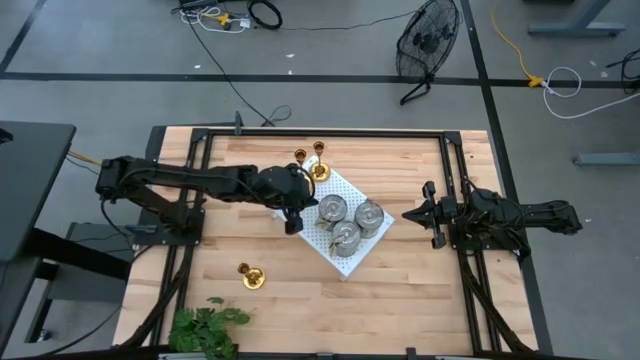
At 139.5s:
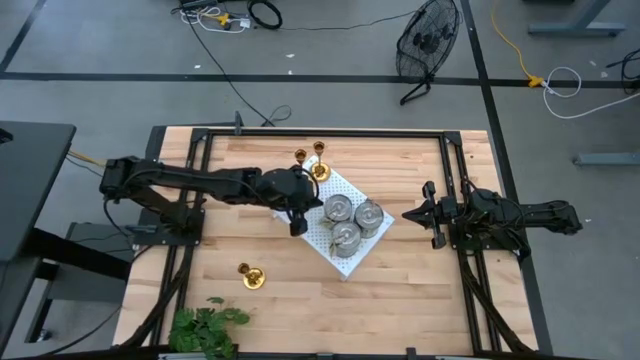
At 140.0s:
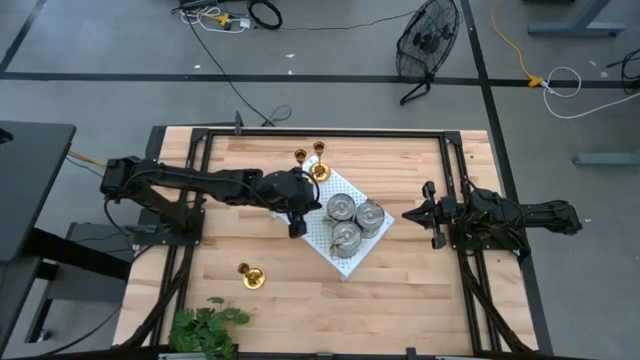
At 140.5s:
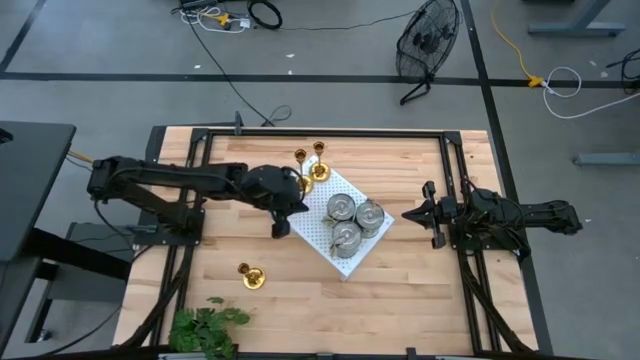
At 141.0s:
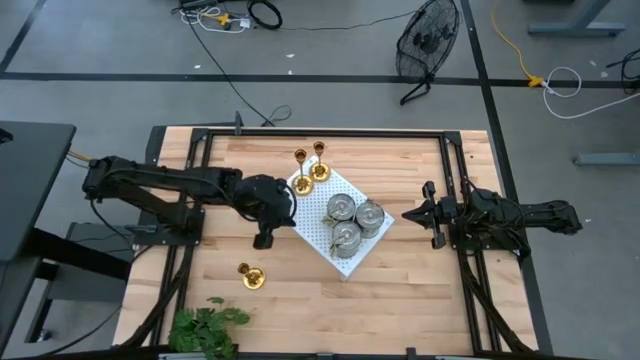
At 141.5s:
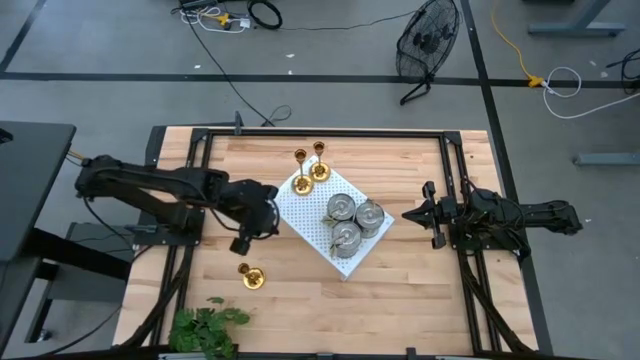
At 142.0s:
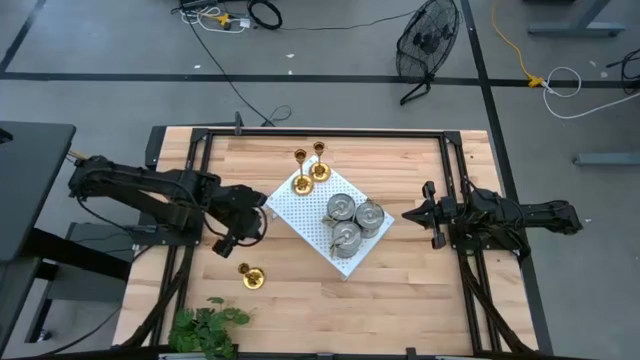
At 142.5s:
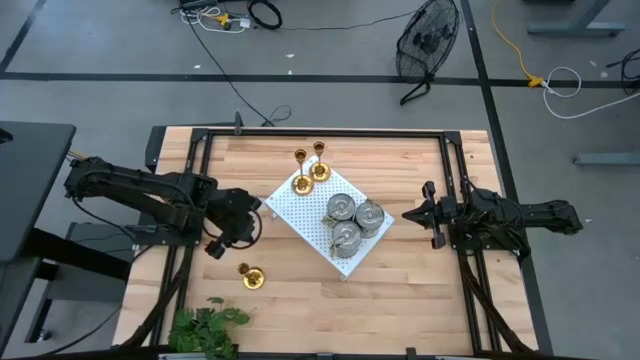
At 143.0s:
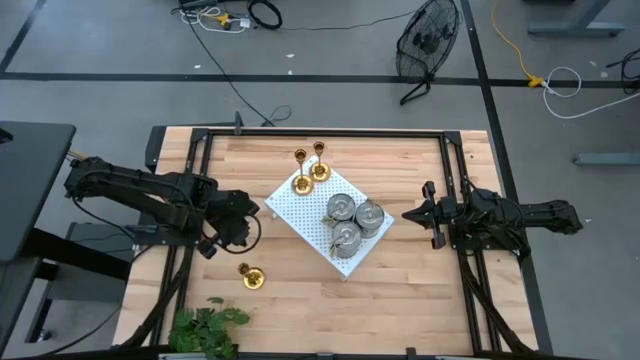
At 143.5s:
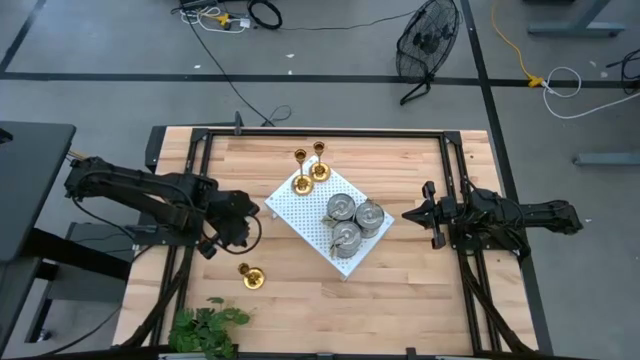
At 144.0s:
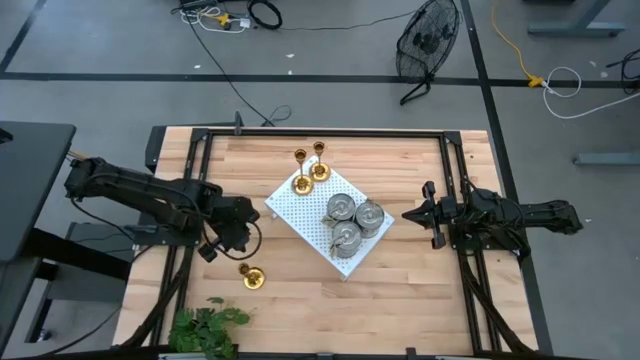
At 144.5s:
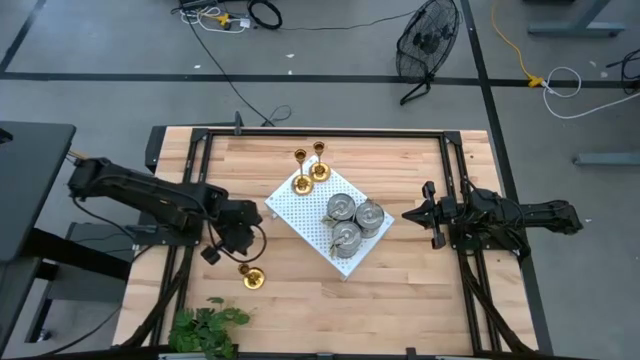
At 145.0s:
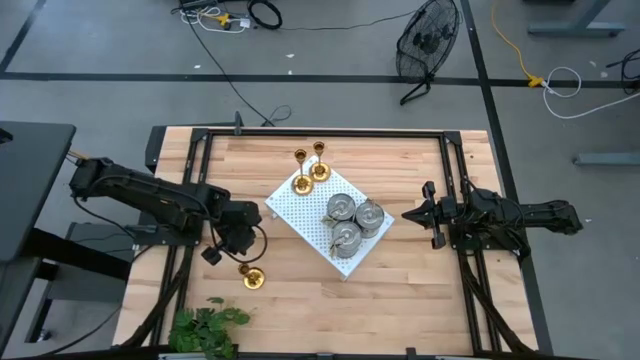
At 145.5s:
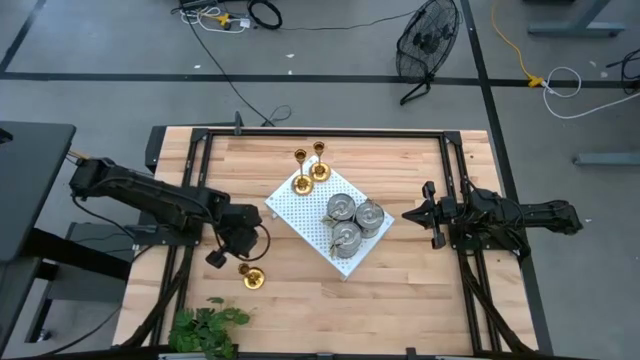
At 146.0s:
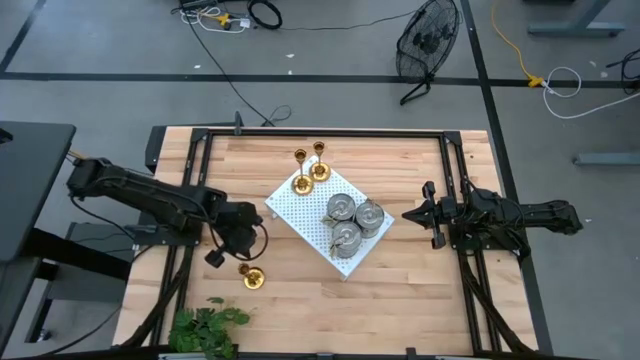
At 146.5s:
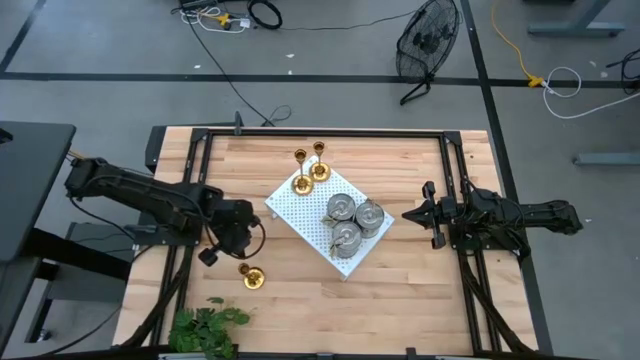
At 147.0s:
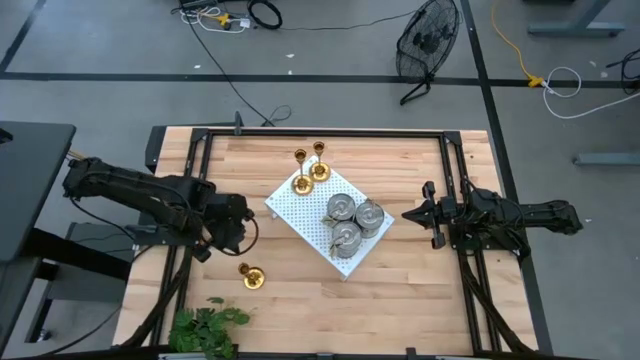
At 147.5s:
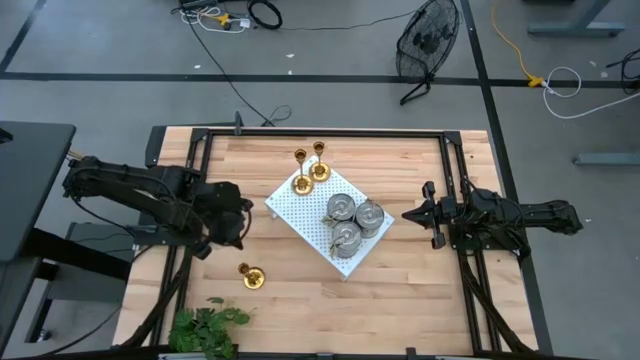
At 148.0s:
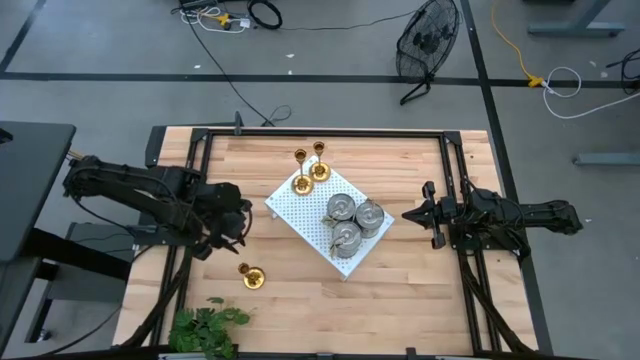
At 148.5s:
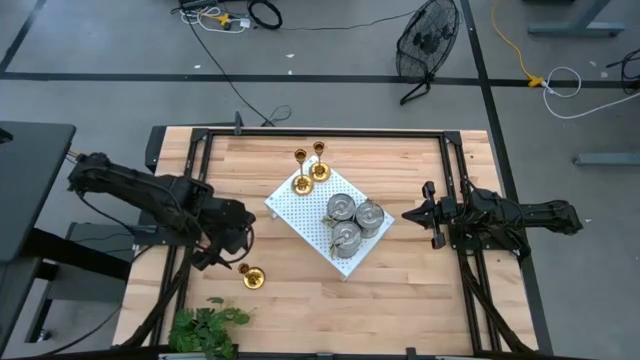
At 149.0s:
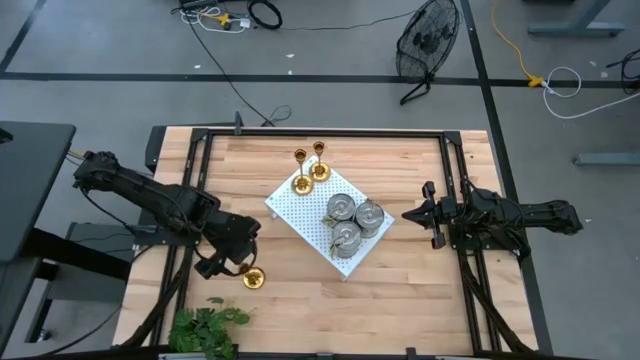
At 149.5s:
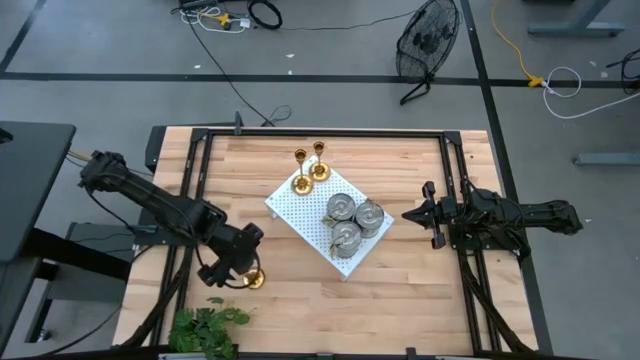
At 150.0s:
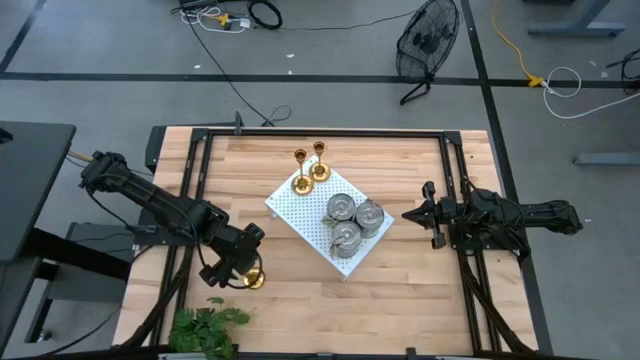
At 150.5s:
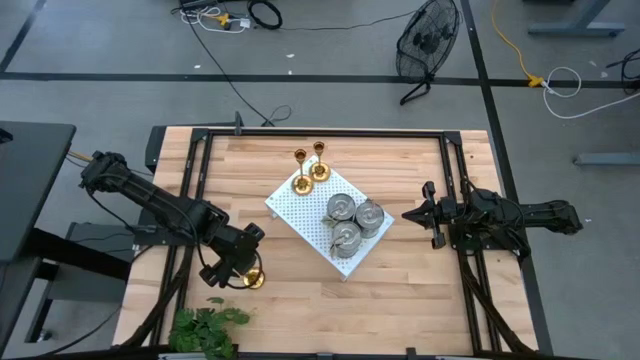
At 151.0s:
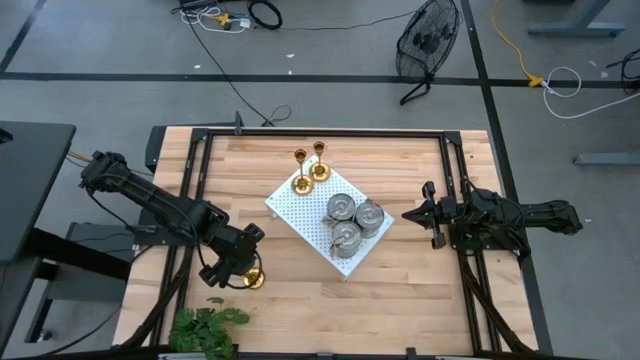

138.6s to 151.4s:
Task: Pick & Place candle stick holders
Put the gold candle holder on the shelf align with the other gold metal candle holder

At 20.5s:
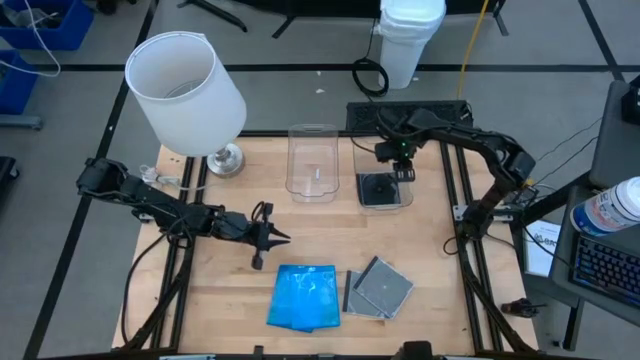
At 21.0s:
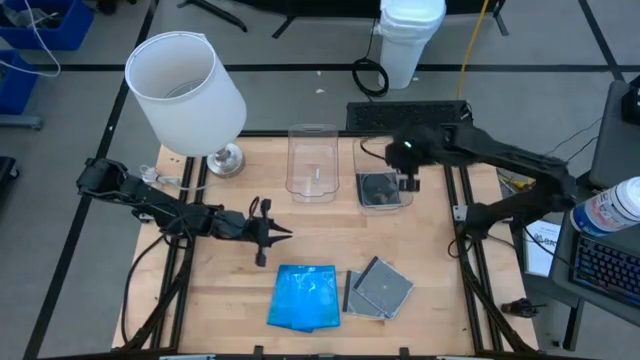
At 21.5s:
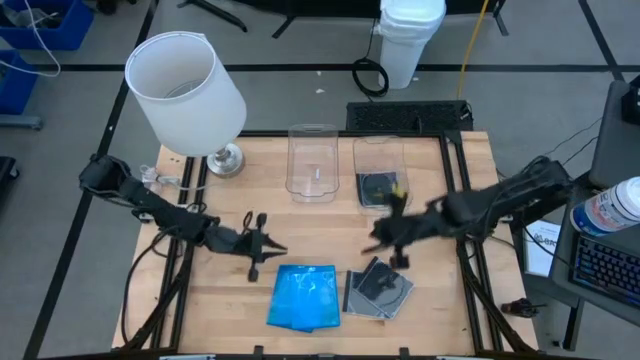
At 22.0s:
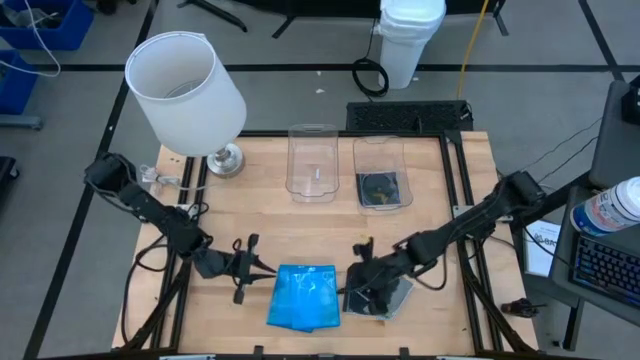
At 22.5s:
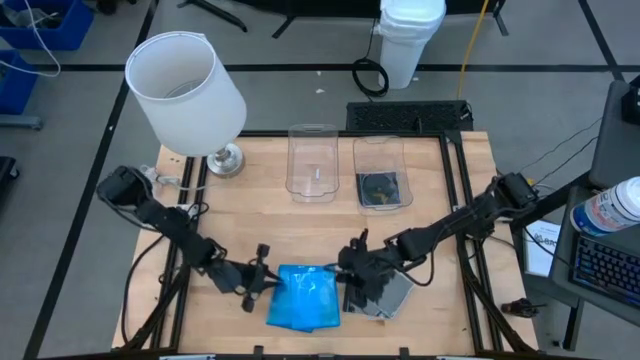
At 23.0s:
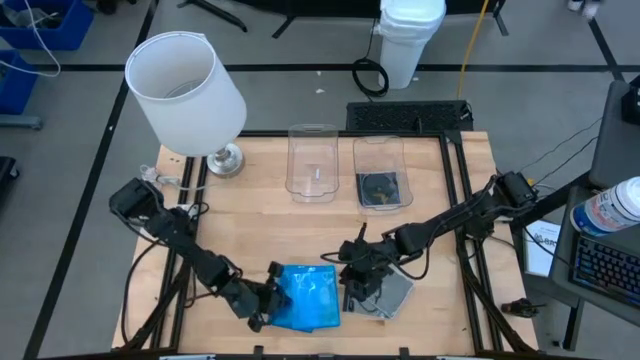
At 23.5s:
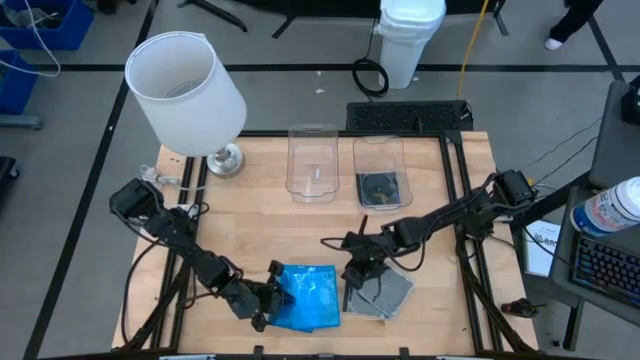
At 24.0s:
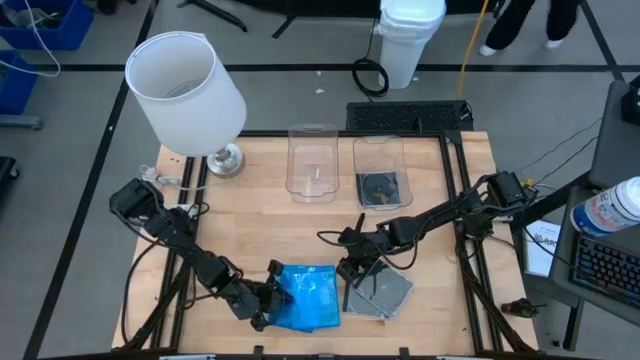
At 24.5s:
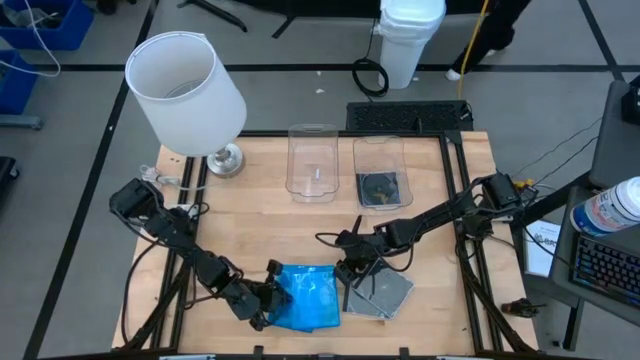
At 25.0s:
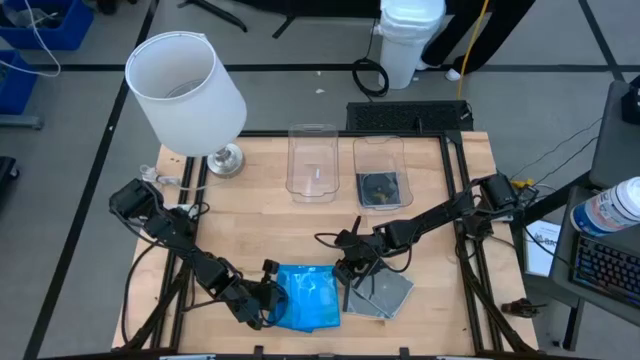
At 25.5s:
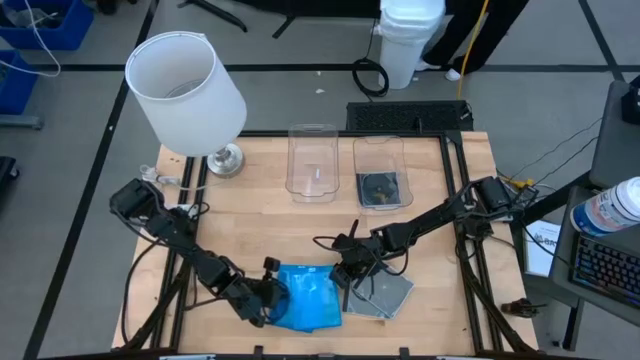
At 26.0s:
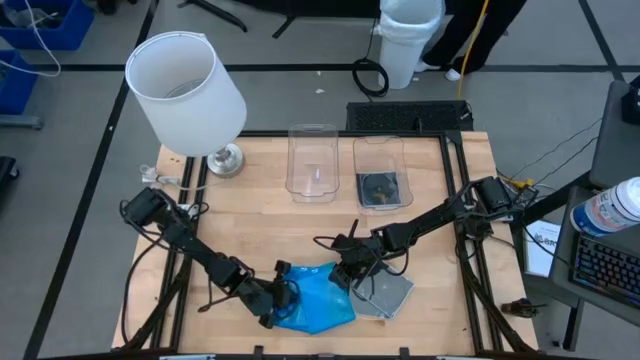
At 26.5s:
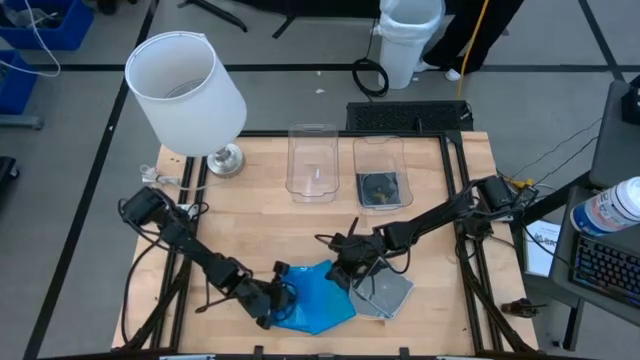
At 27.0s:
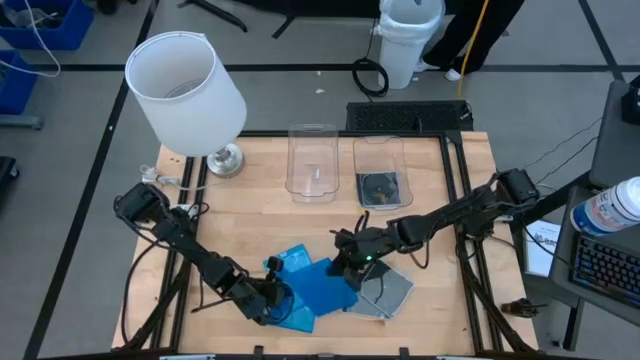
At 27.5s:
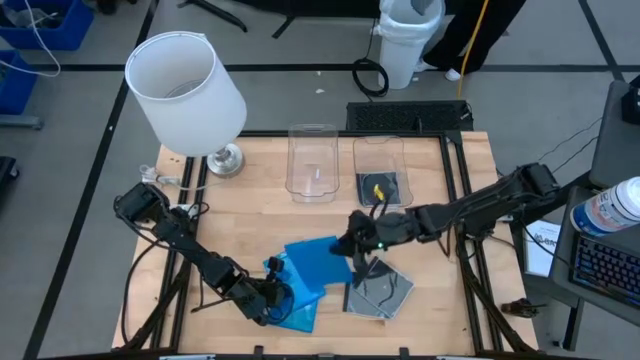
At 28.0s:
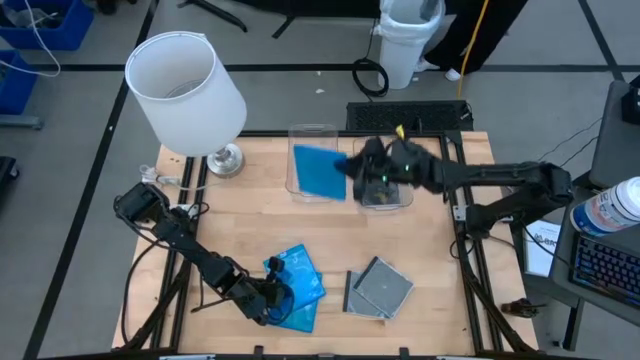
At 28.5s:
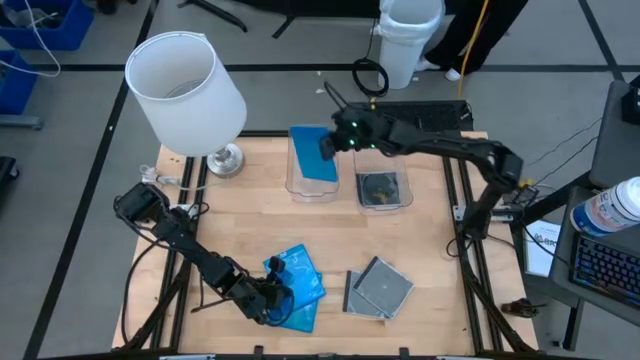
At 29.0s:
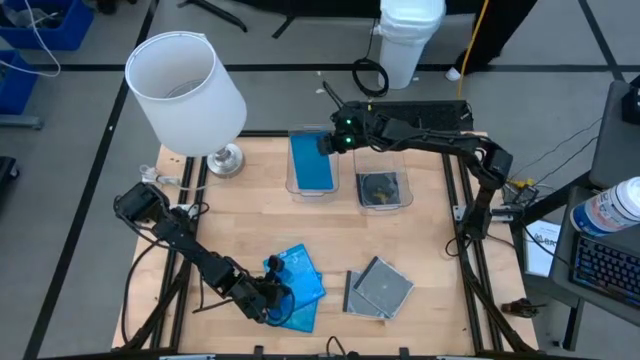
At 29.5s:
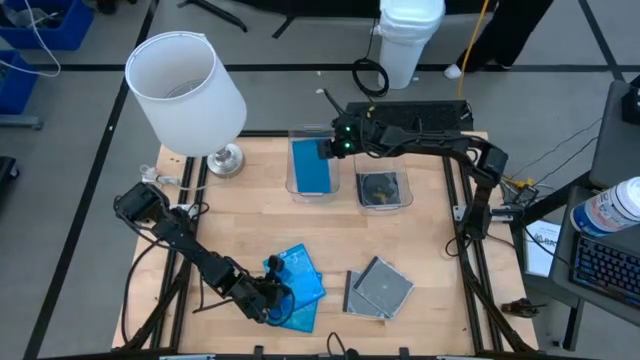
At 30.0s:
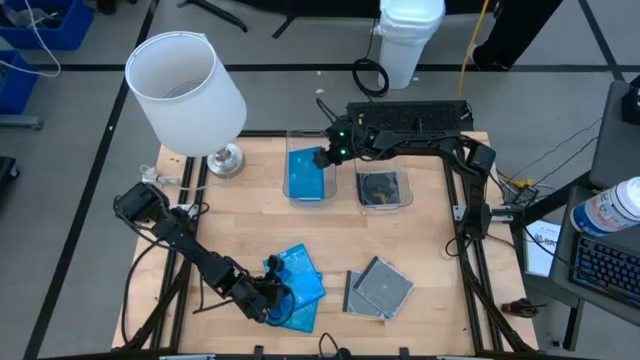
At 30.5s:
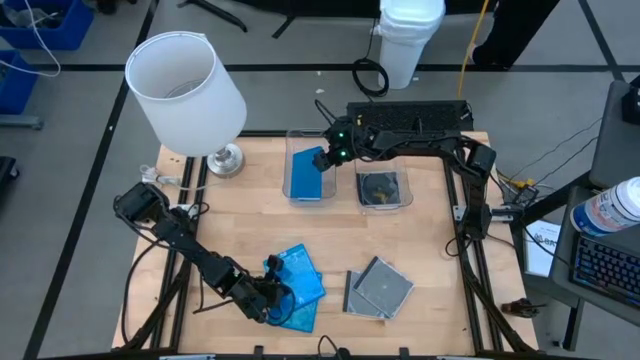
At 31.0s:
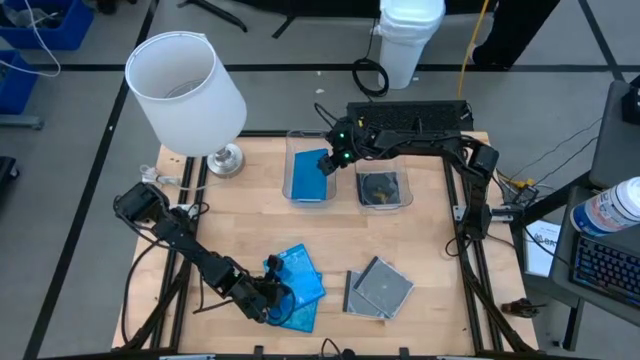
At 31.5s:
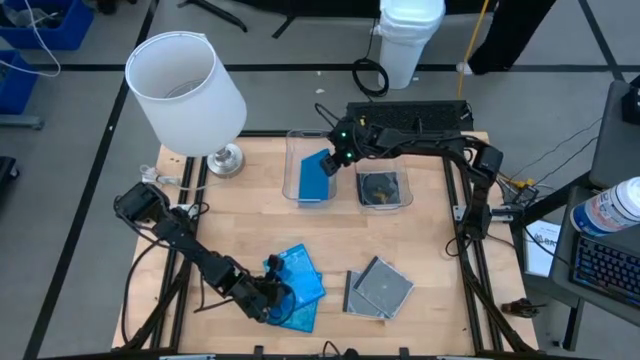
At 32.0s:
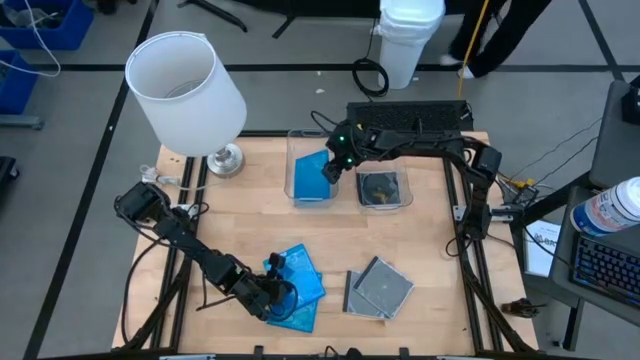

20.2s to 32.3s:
Task: Pick & place jewel cases by type
Put the right blue CD case into the left transparent bin
